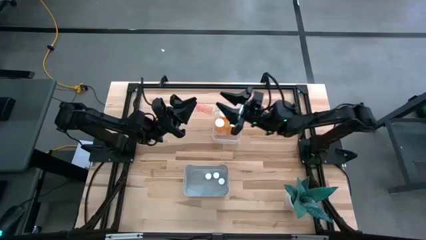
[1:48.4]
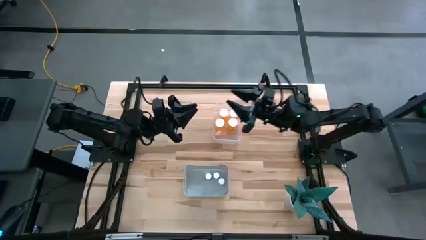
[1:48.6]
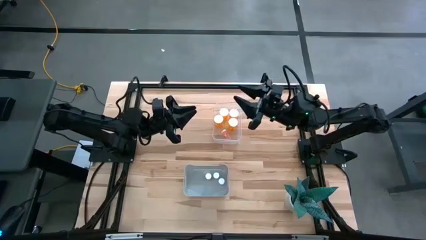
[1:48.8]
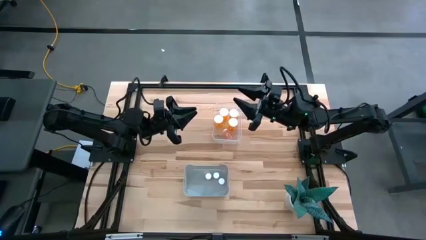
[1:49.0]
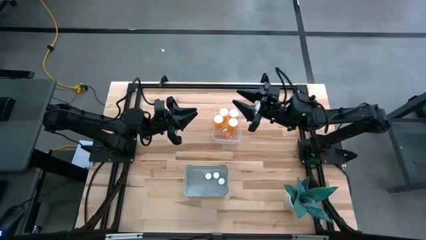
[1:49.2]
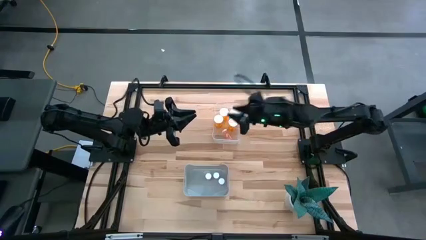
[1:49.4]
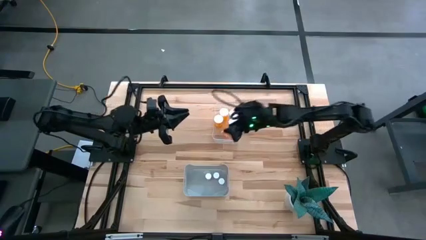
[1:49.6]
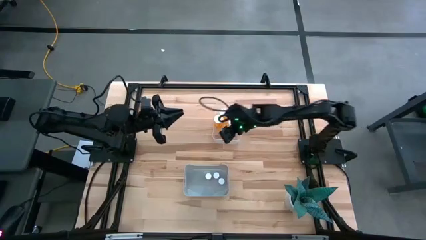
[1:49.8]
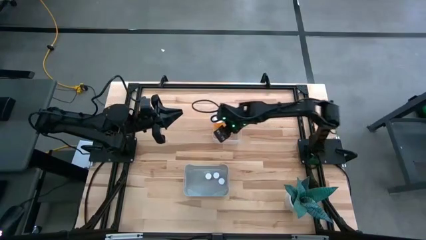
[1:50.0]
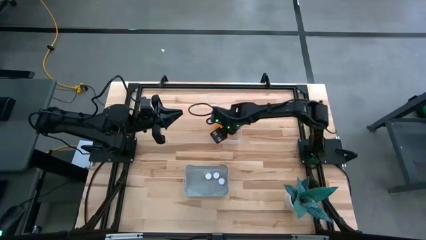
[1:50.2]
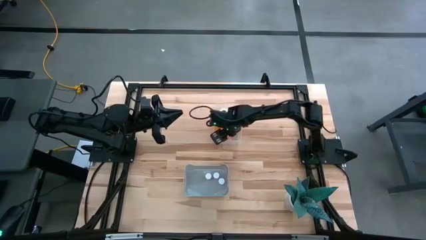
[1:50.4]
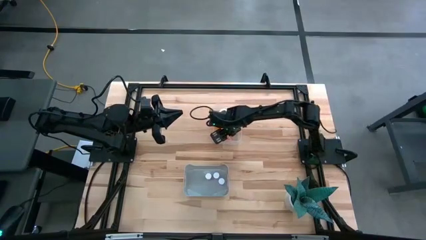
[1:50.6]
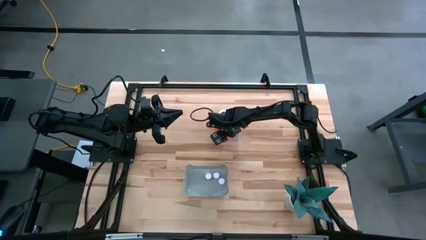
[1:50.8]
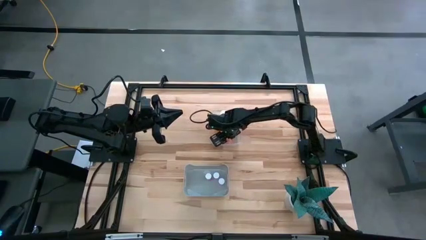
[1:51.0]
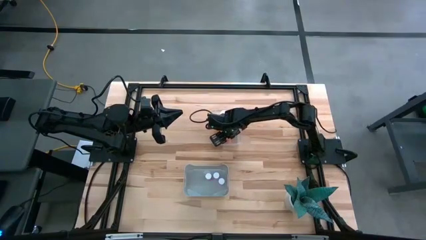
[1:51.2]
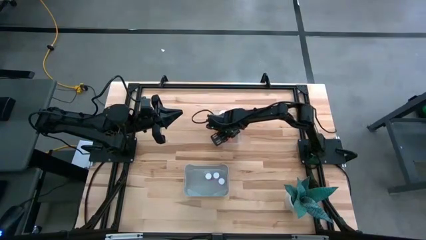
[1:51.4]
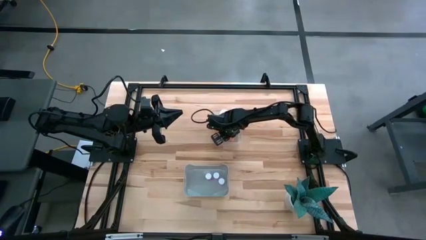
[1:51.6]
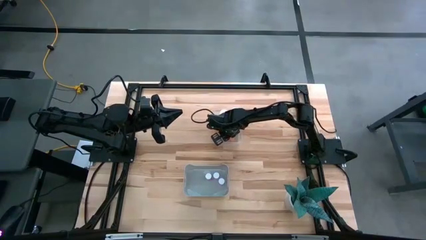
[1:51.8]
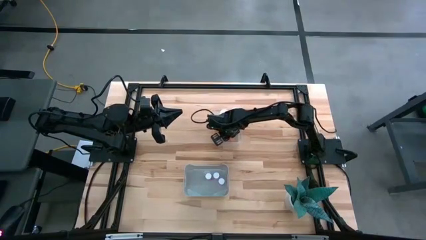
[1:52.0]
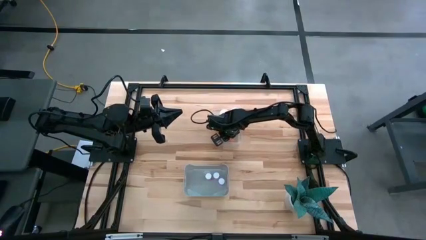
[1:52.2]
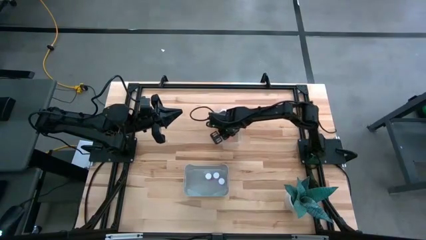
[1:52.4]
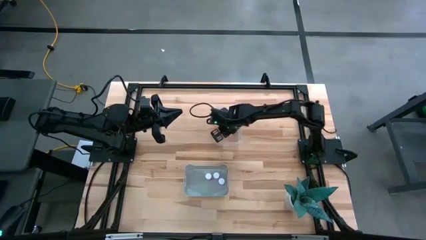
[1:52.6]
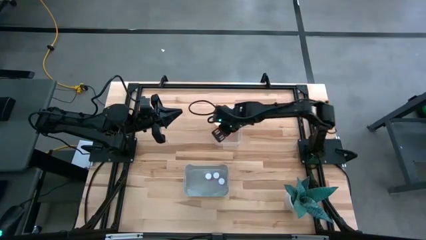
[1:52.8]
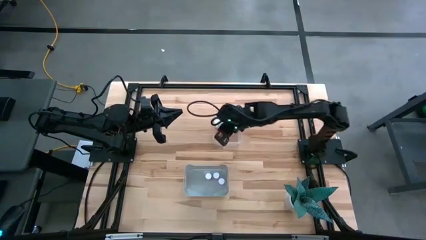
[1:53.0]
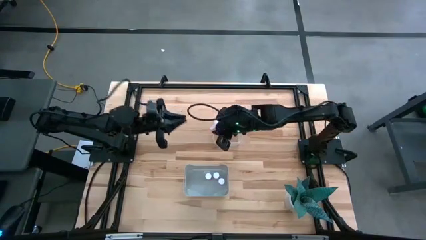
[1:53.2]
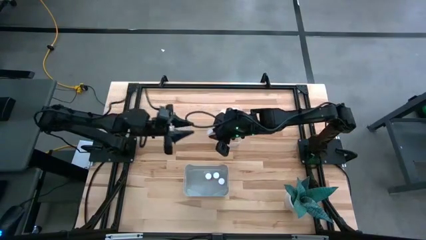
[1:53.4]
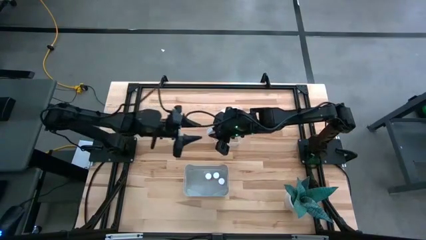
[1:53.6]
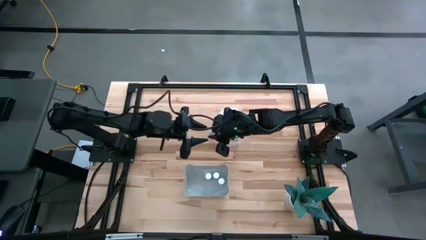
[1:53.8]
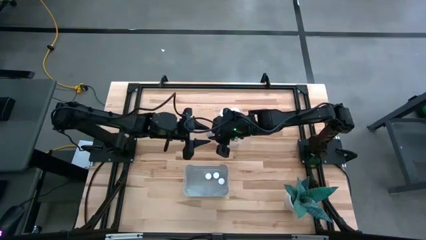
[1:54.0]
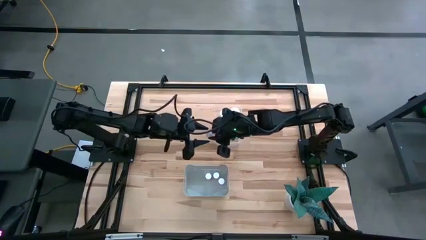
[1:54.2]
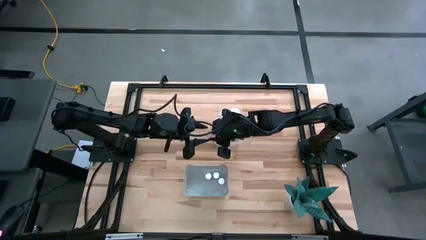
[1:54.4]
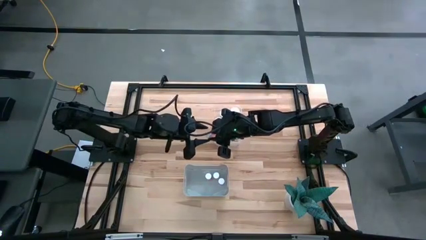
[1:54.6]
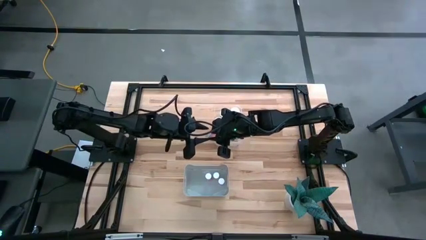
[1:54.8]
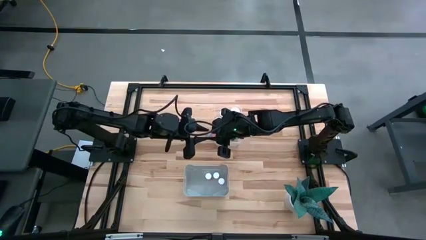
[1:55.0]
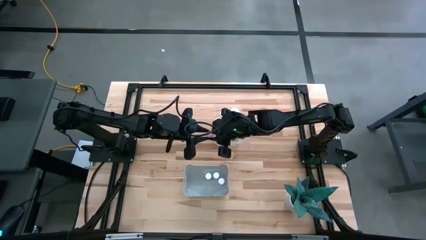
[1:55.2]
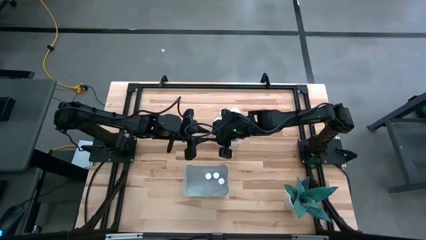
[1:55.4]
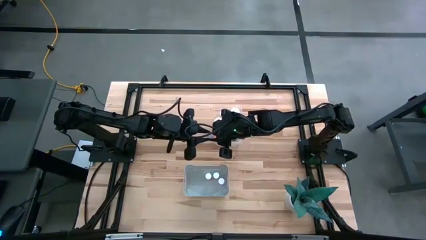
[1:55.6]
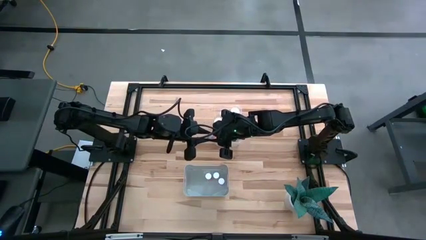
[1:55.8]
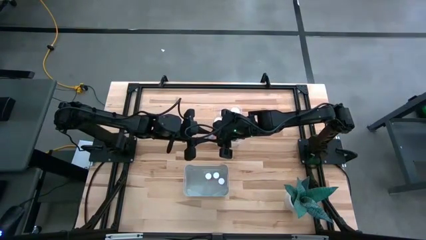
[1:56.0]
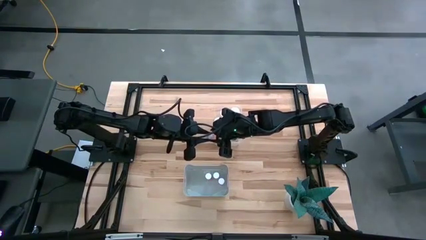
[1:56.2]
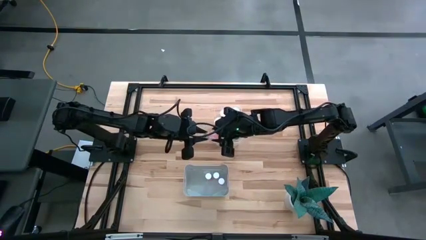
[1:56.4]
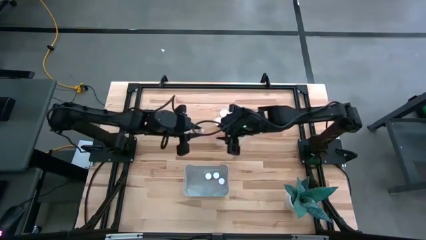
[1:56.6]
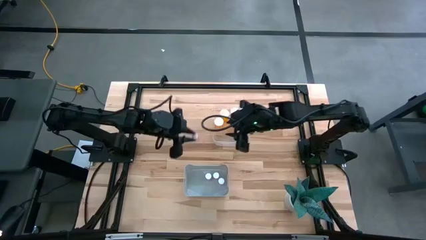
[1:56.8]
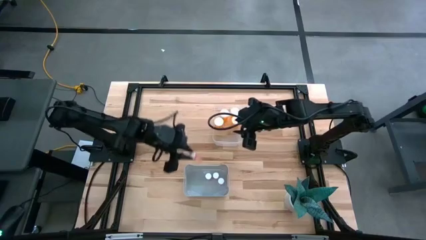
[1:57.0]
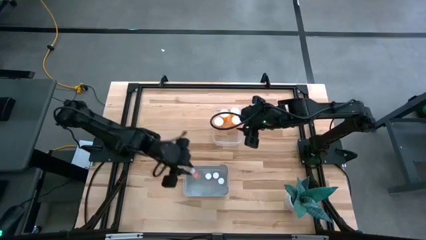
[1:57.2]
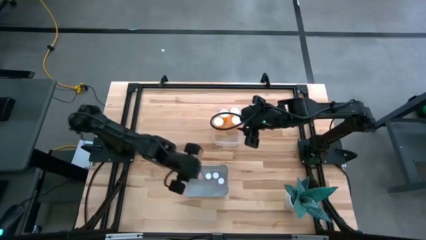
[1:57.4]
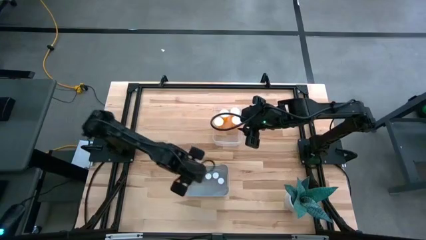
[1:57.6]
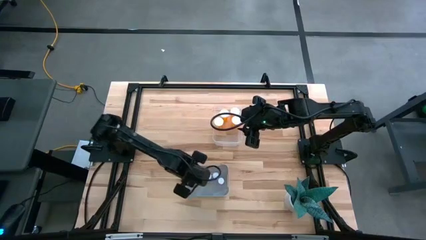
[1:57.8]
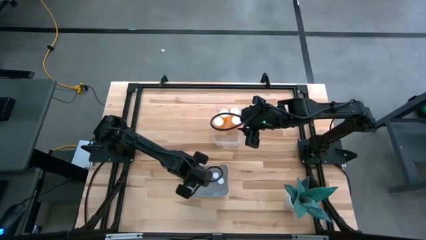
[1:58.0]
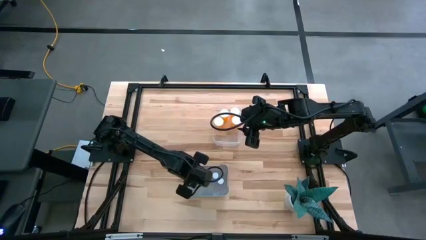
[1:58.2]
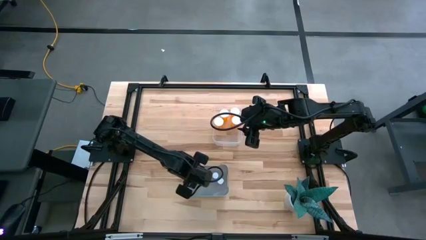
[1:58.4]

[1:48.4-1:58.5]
Task: Pick and place medicine bottles into bin by pill shape (circle, oval)
Put the pink pill bottle into the white bin

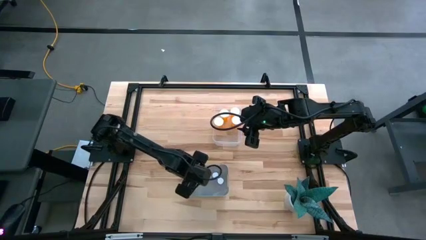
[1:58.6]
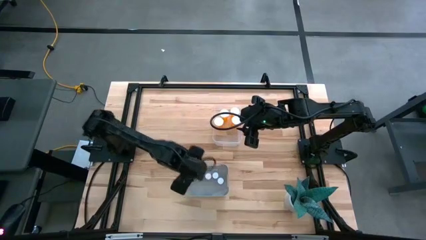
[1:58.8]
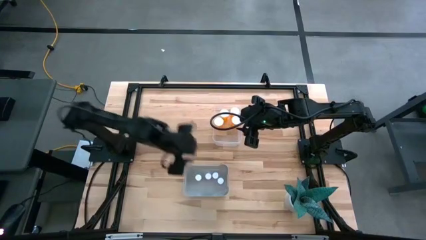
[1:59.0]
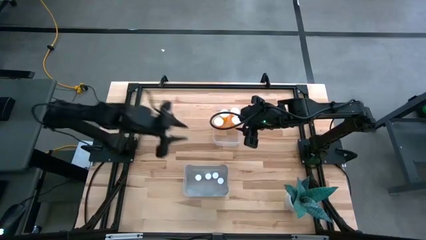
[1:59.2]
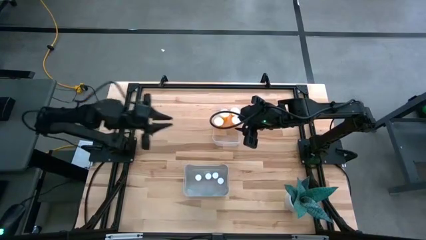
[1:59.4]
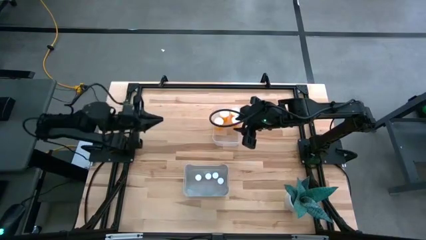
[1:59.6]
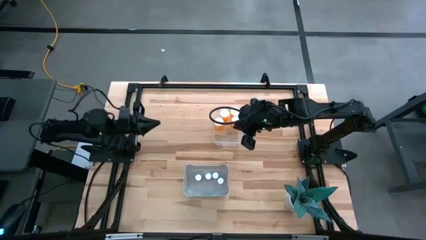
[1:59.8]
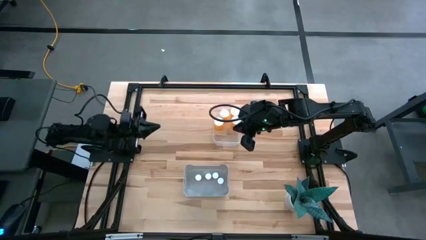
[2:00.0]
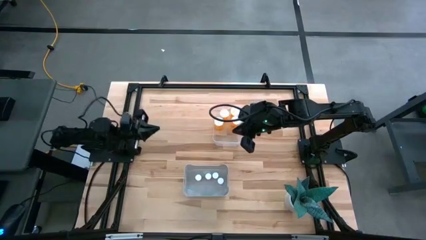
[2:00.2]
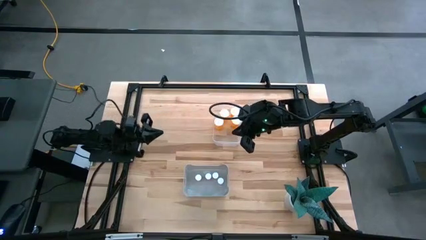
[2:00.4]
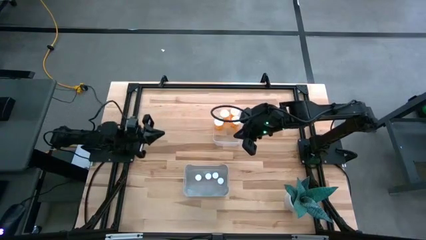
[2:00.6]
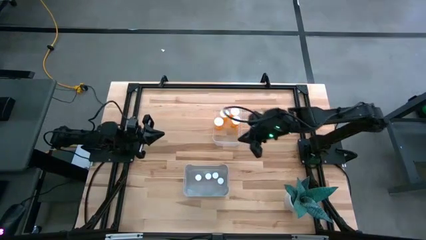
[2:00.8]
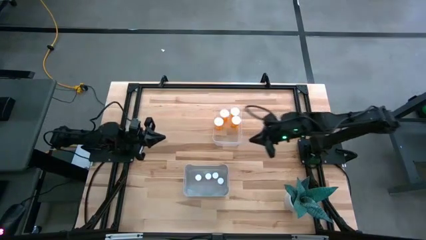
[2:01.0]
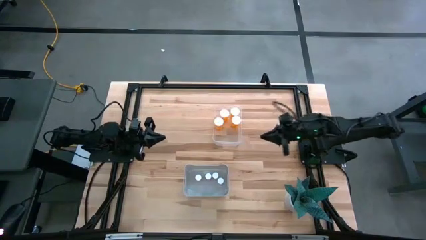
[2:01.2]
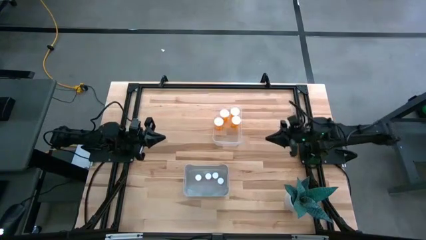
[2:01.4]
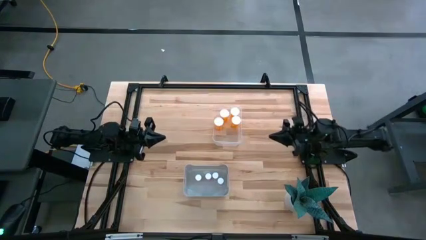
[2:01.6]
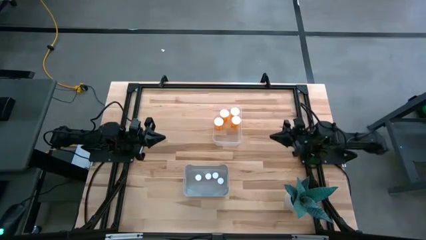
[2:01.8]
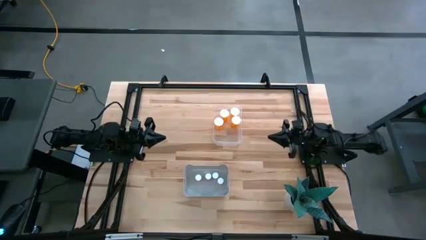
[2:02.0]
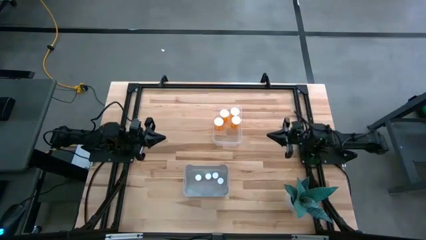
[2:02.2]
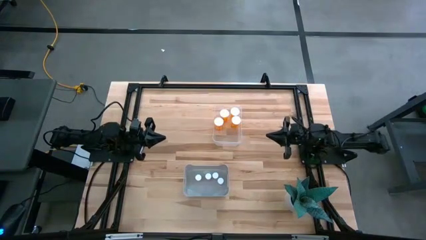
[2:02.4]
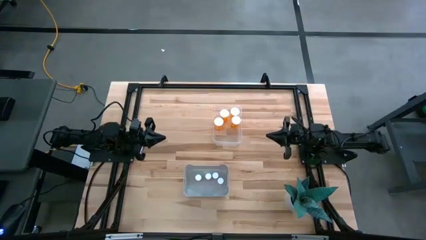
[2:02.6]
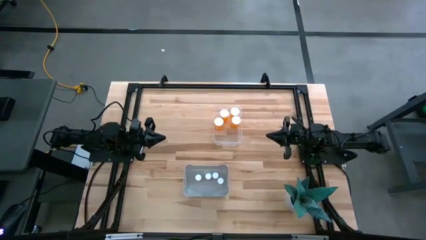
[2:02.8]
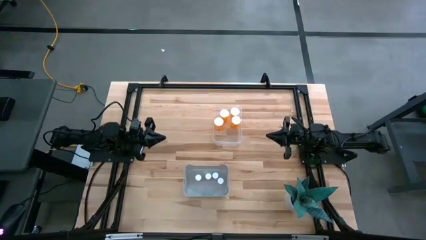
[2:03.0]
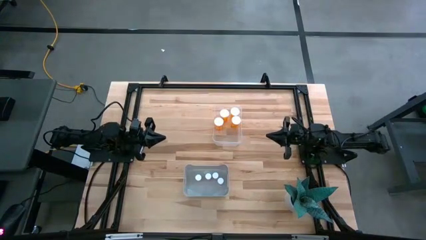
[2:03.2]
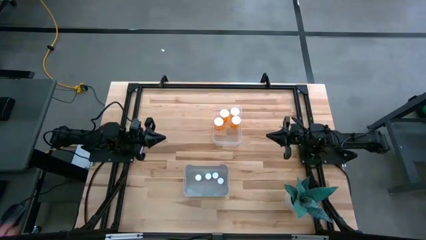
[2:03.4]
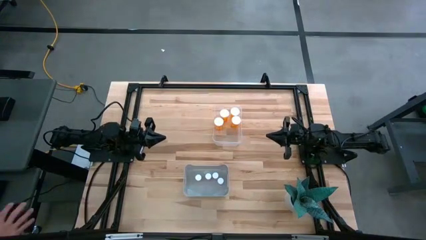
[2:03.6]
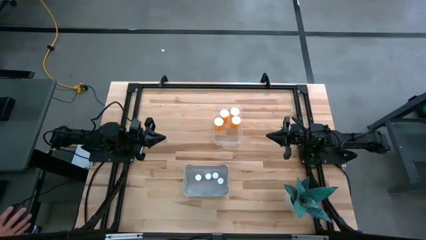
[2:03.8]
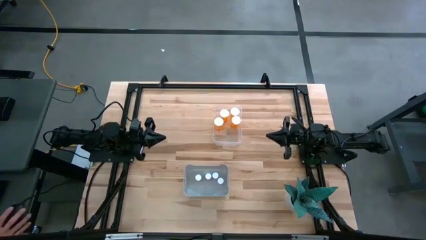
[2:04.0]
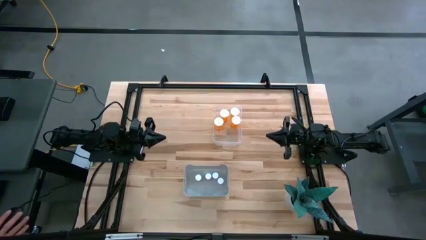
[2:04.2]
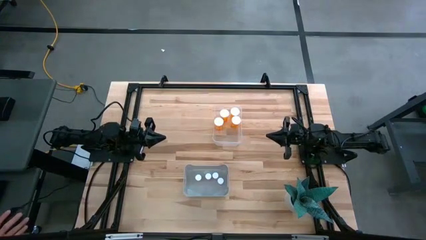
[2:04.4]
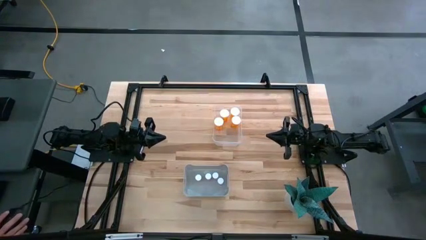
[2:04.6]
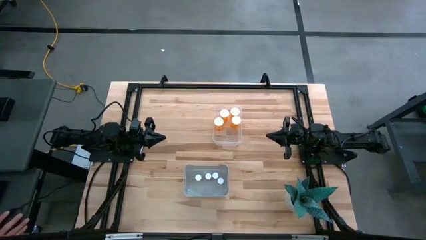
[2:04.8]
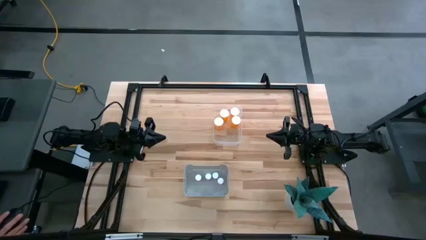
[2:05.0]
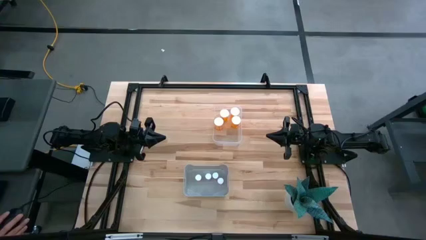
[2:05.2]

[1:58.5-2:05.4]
Return to Home Position
